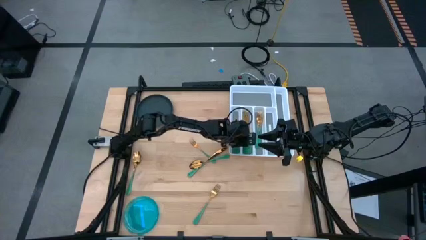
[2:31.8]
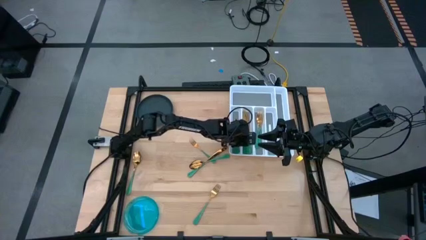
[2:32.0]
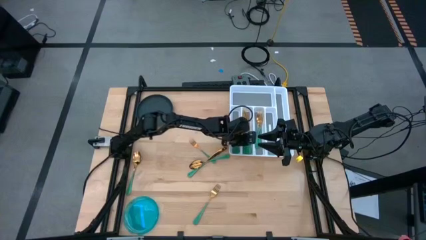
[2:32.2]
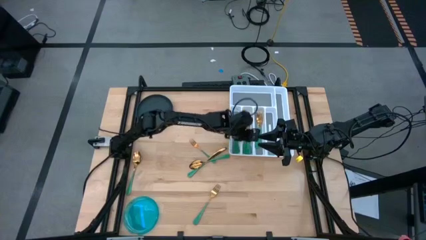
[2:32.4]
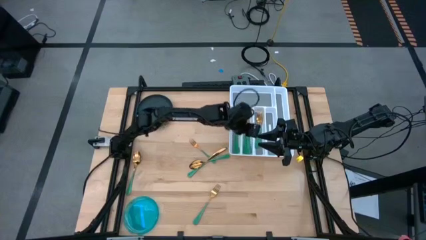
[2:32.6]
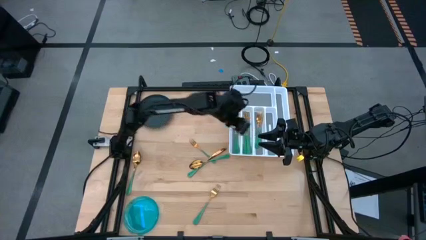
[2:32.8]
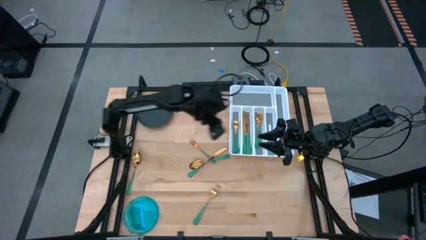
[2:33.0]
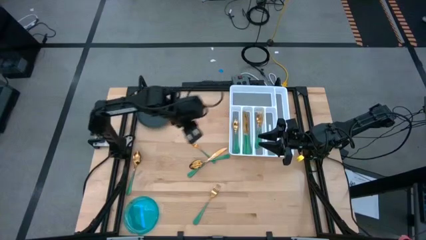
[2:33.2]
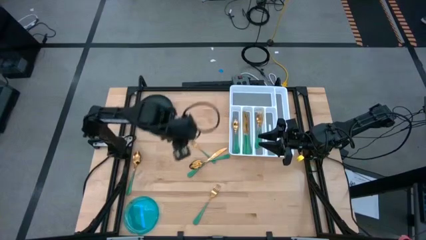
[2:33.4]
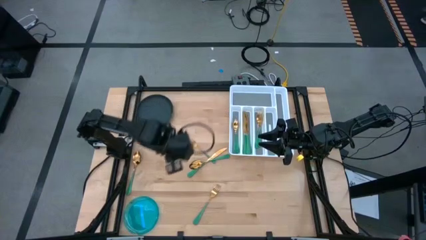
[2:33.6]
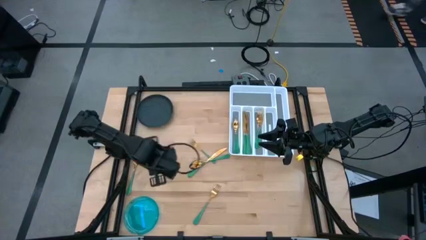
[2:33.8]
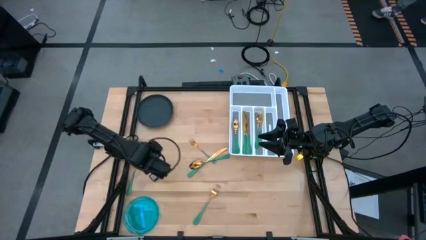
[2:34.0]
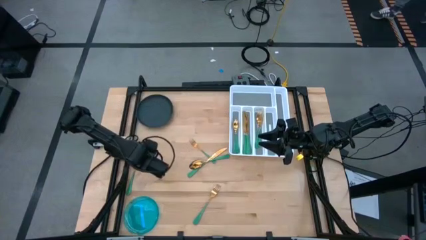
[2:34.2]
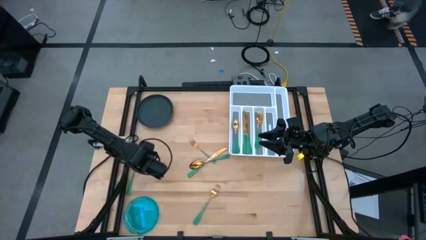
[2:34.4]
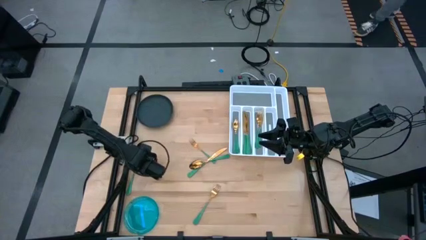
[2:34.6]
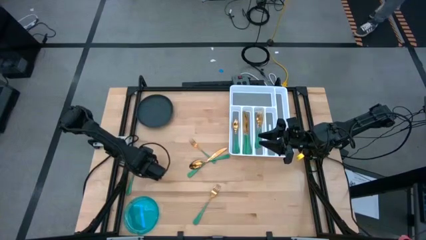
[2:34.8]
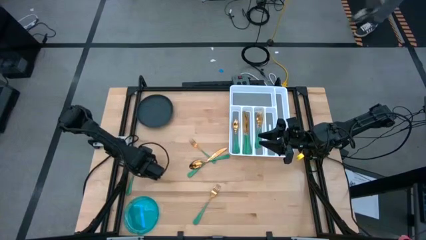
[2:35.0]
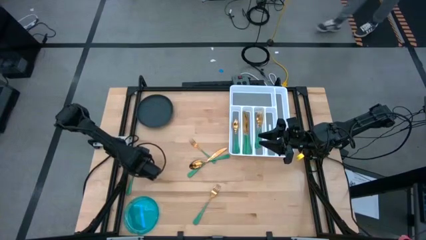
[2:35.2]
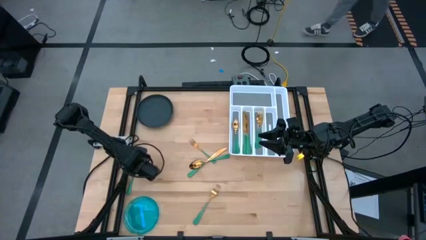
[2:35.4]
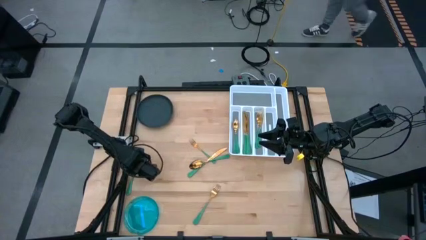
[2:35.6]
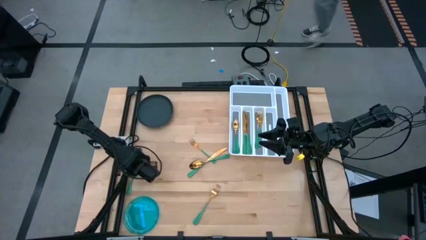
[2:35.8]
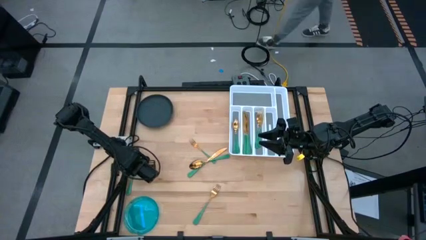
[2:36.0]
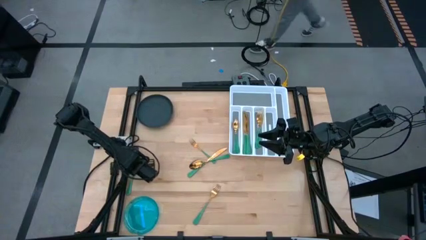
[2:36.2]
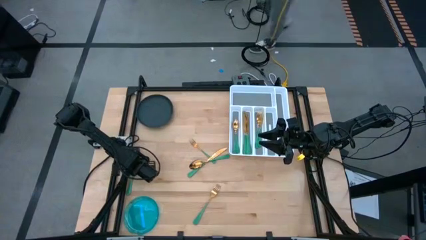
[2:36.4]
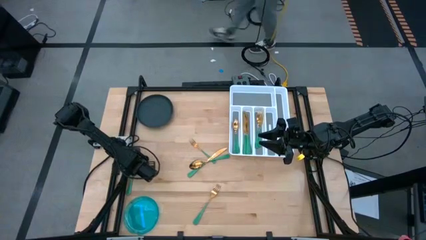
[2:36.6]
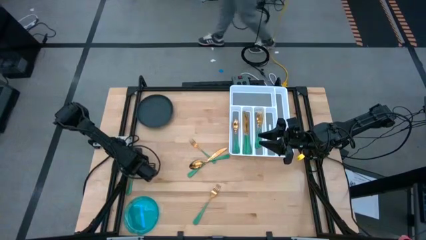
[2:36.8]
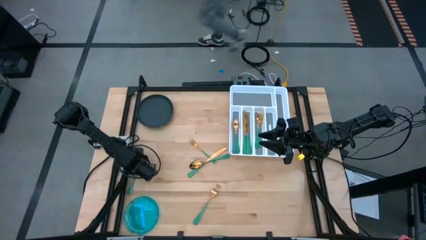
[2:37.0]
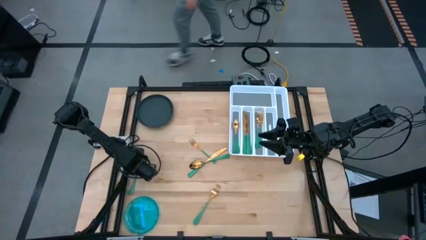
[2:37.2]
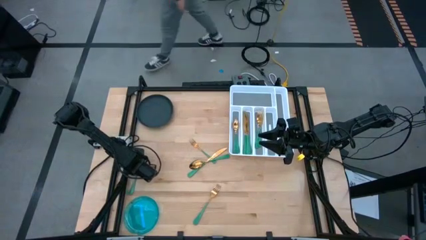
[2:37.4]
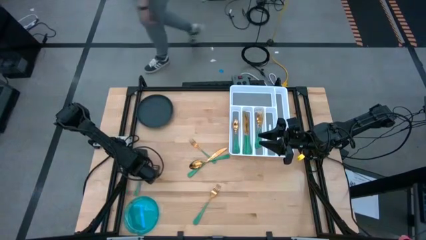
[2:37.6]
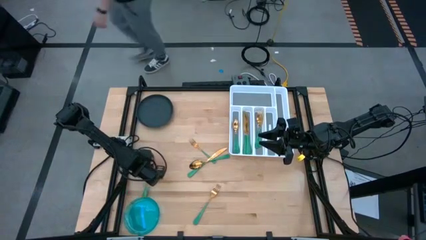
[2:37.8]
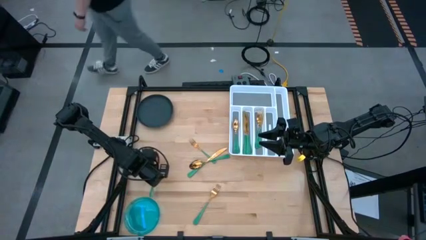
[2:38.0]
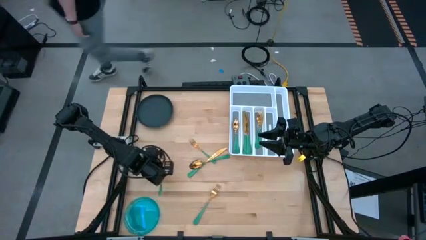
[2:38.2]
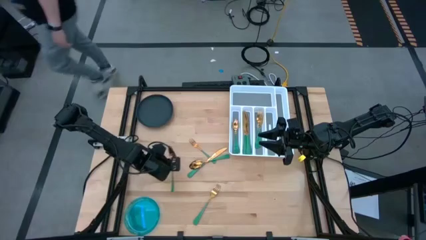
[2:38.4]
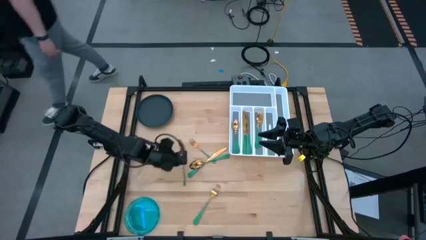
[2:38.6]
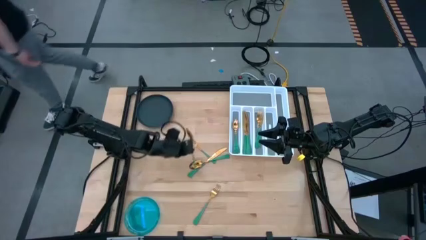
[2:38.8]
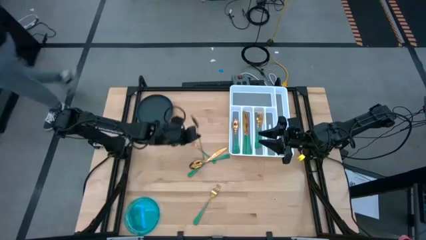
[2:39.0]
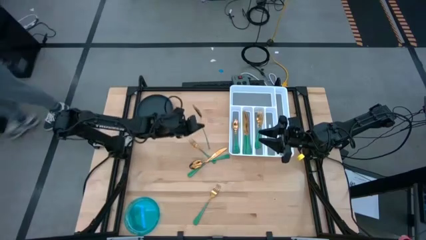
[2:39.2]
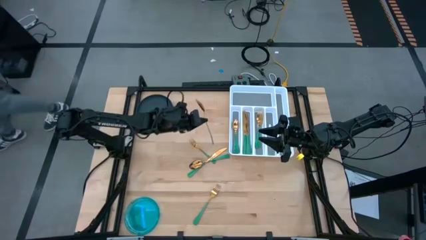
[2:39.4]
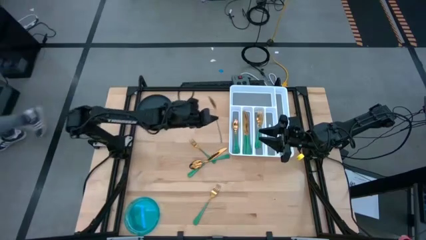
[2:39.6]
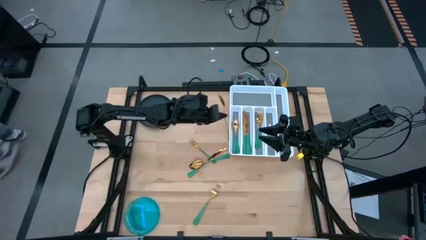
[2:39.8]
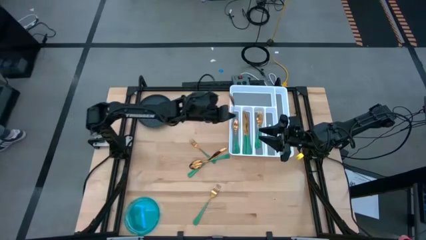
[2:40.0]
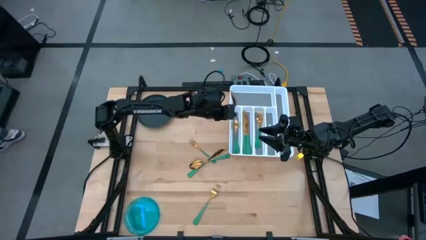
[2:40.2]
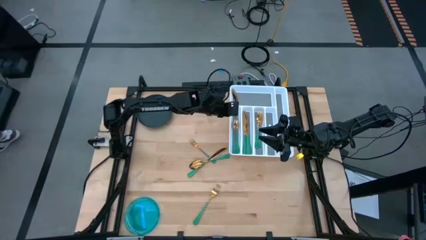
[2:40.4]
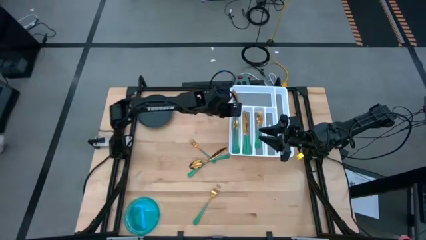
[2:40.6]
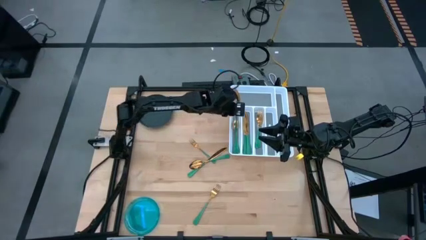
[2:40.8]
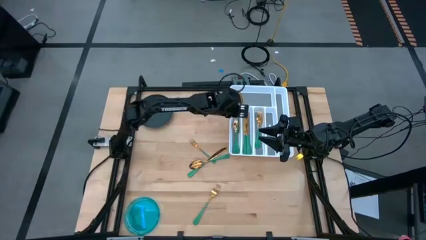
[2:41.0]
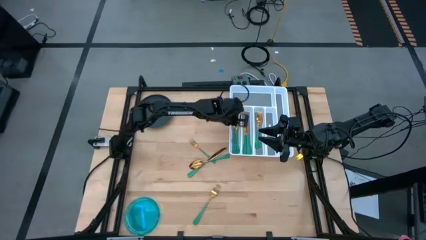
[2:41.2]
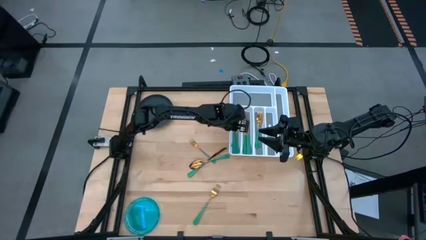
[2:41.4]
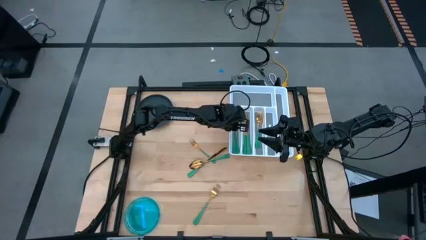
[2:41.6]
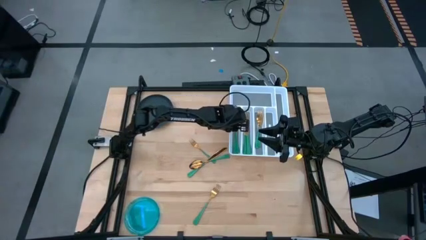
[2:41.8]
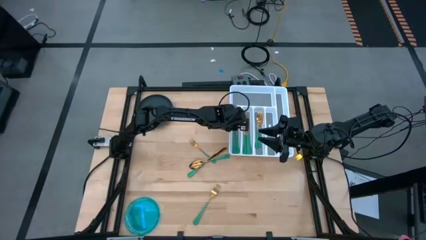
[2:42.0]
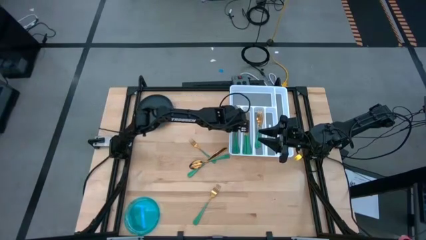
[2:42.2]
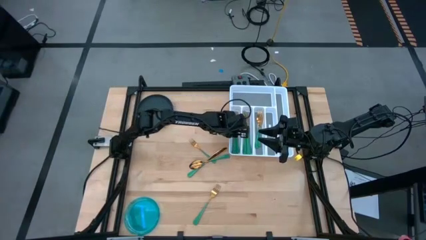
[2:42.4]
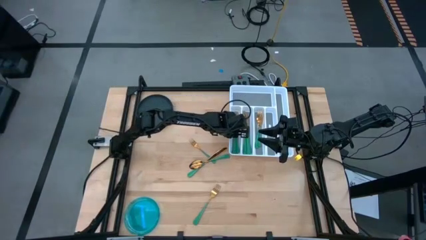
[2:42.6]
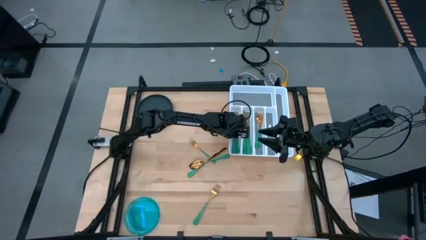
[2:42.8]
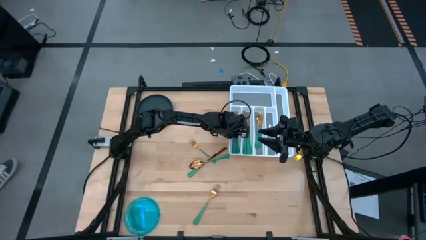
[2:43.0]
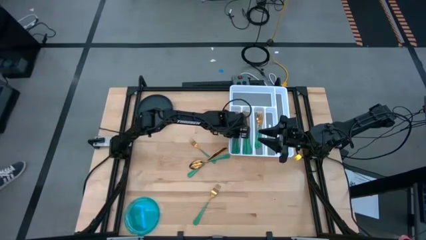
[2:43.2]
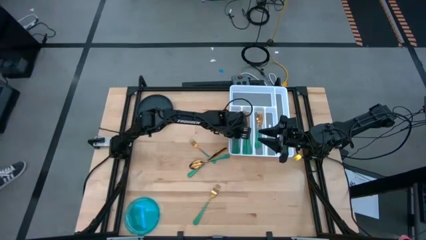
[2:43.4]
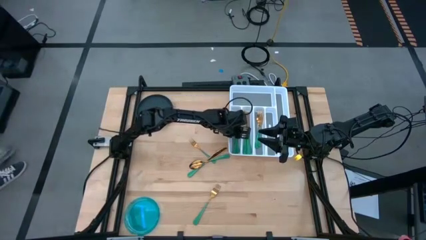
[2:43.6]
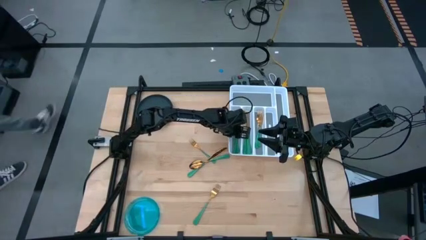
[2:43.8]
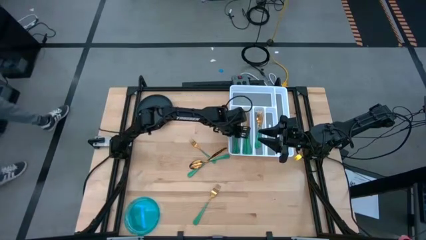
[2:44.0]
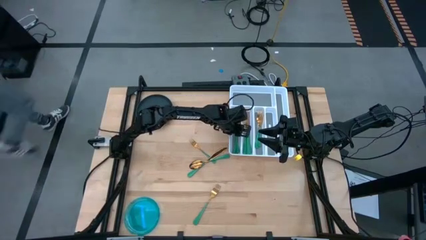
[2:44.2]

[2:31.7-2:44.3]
Task: Sort silverware
Put the green spoon on the silverware organizer

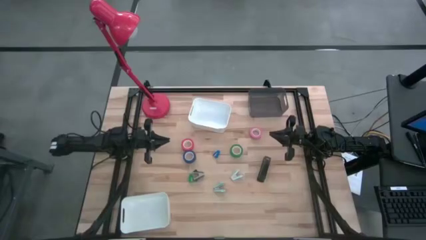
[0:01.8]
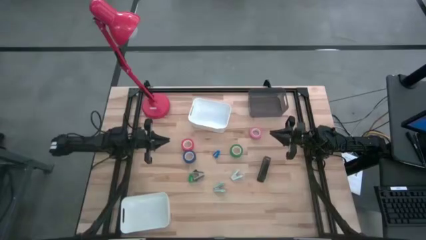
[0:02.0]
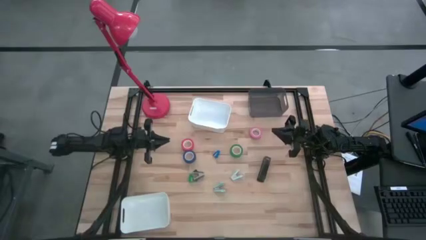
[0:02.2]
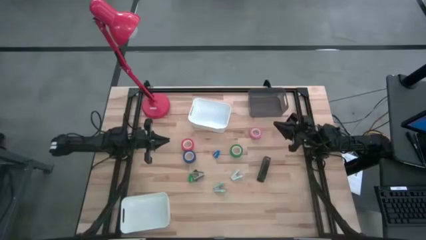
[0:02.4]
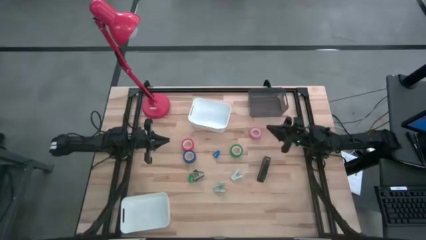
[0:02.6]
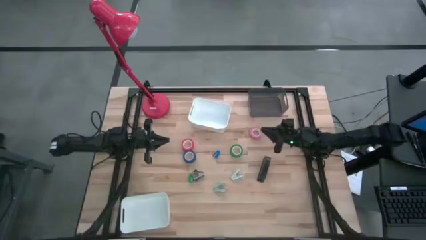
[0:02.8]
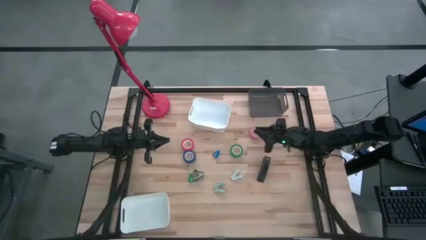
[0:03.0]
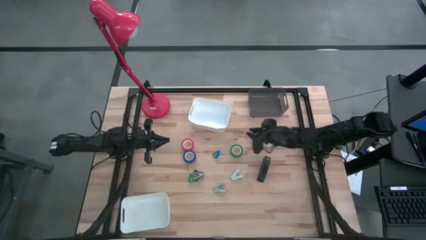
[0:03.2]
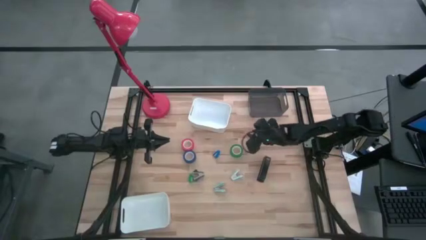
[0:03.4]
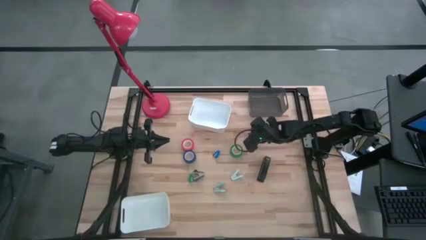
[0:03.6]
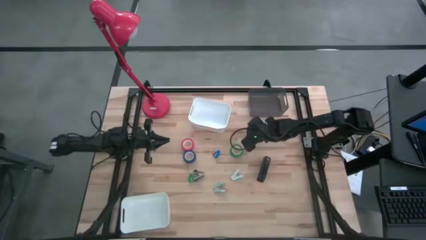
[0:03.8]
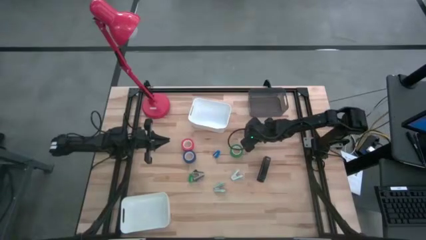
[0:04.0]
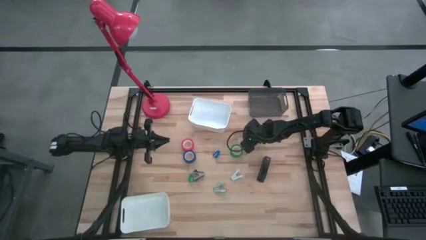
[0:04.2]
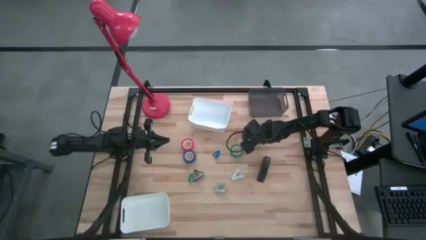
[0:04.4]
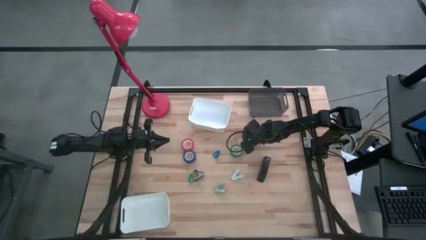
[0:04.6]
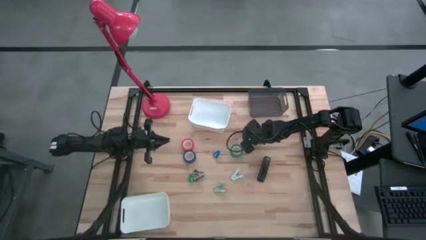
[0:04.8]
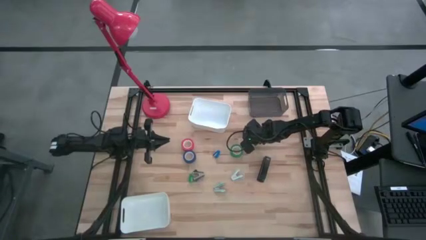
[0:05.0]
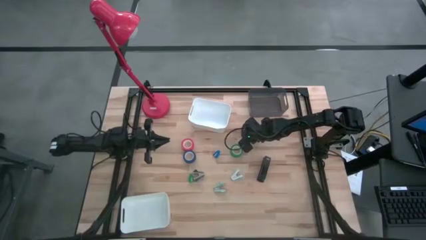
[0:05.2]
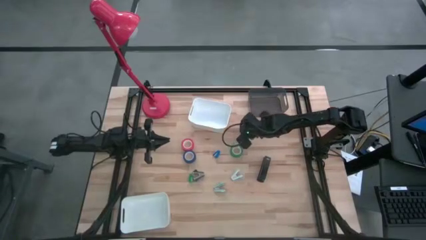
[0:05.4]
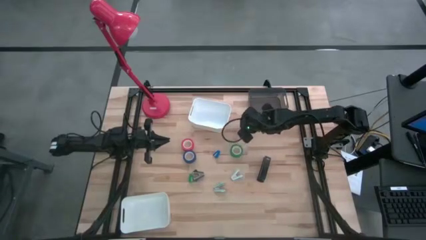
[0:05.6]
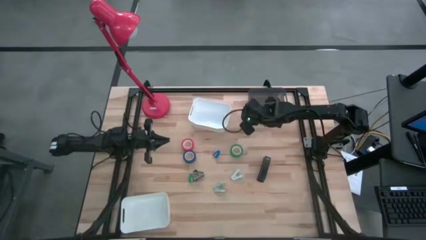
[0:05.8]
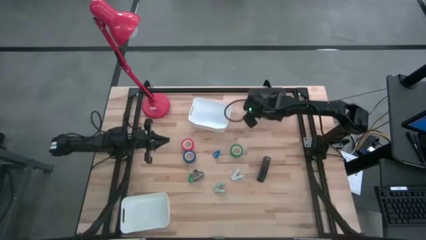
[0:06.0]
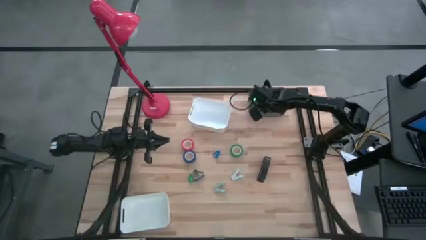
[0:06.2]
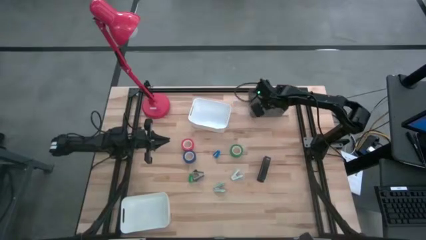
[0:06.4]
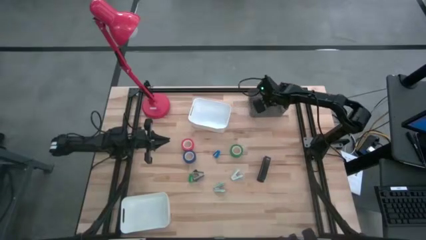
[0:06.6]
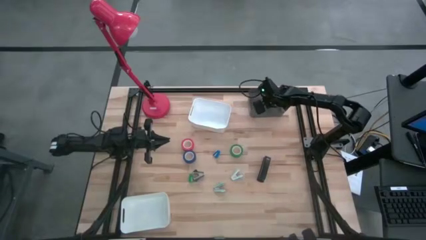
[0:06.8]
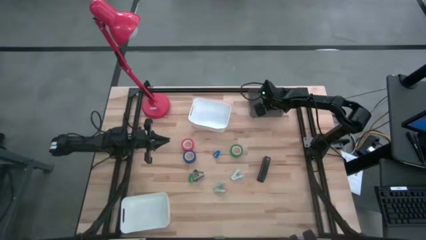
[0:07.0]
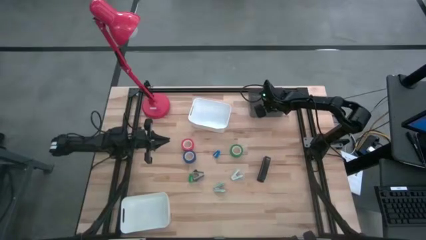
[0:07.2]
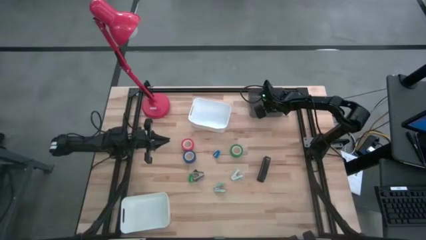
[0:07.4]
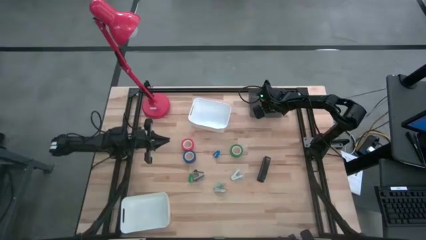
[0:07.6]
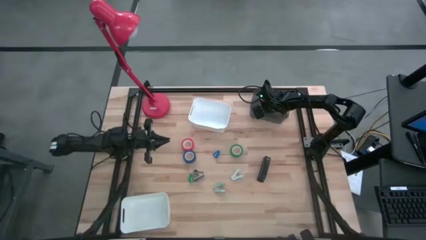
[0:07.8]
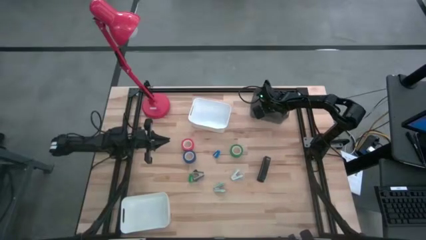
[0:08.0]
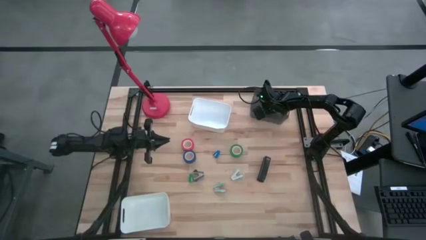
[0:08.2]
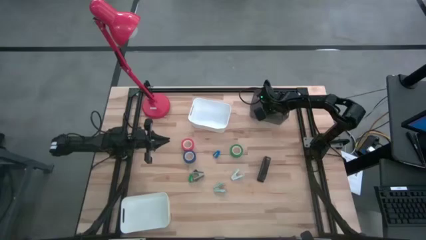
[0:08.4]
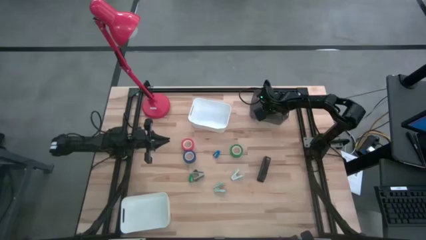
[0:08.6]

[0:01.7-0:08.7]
Task: Pick and place Stapler, Stapler remover, tape
Put the pink tape into the gray bin
